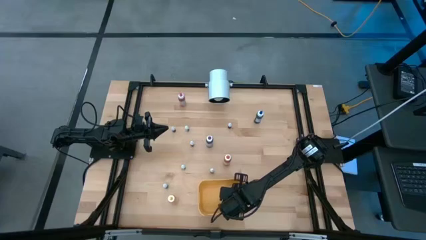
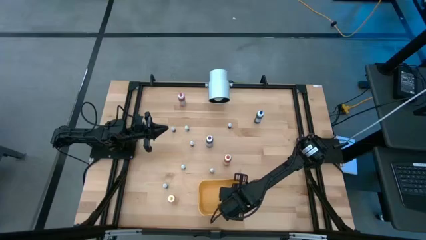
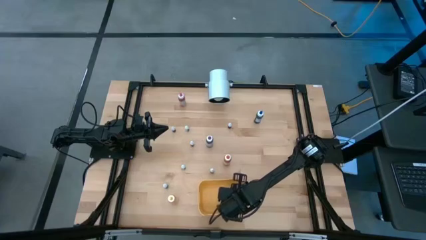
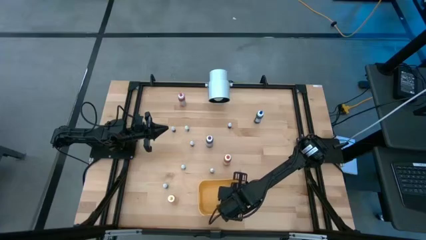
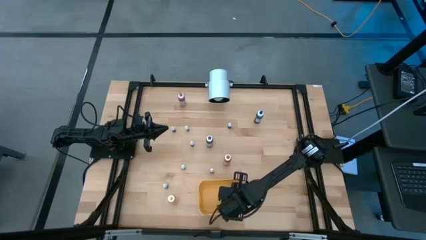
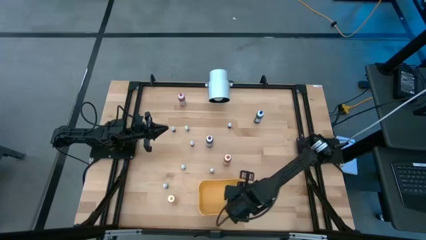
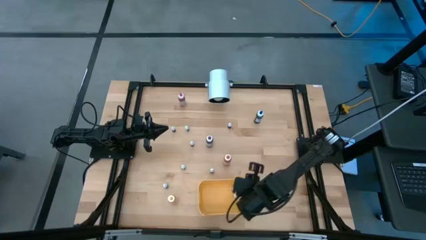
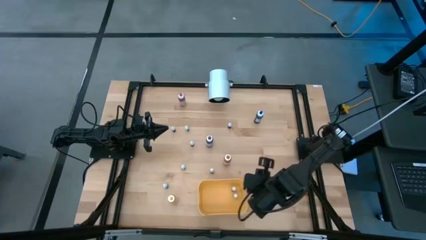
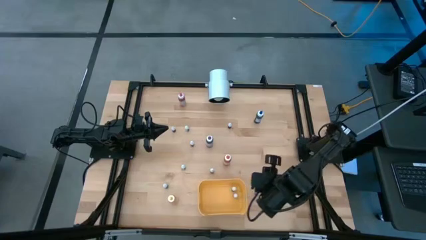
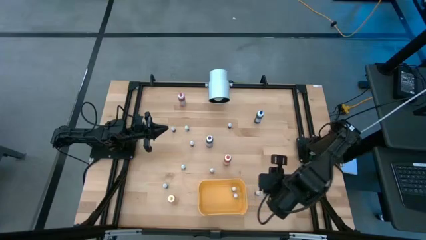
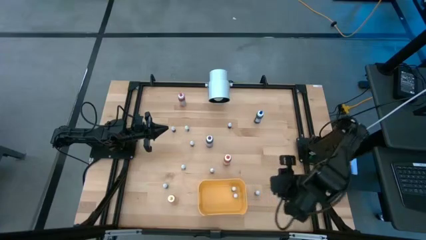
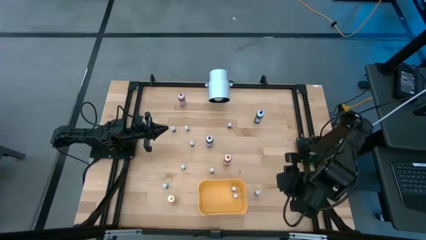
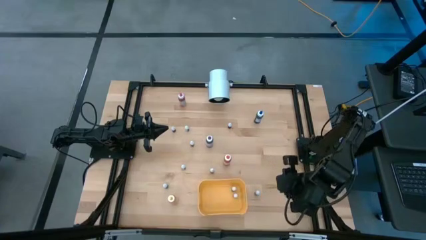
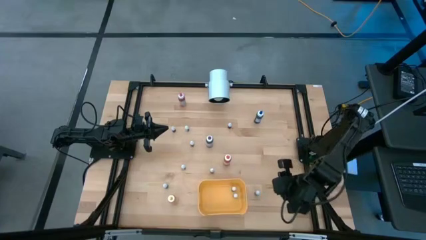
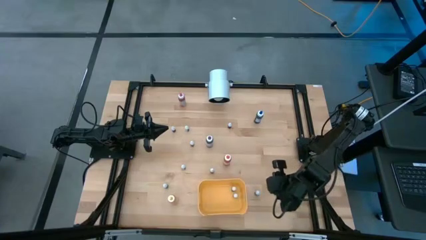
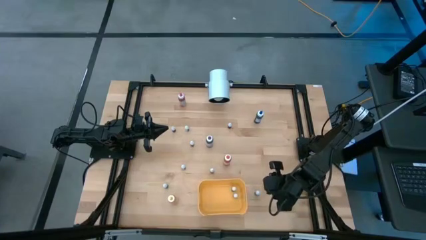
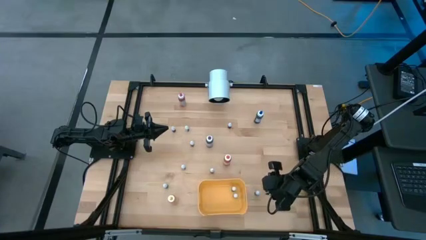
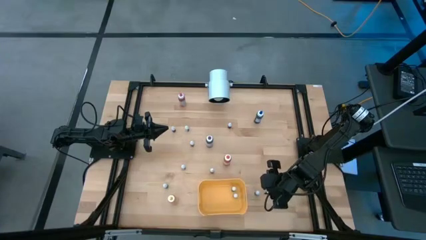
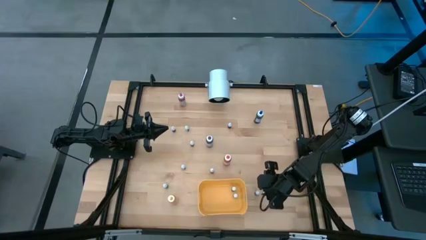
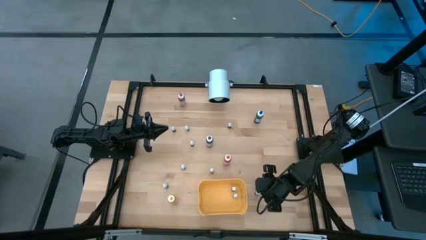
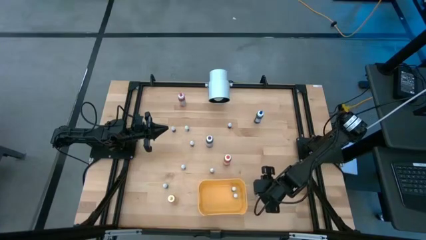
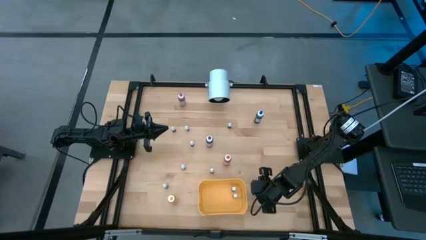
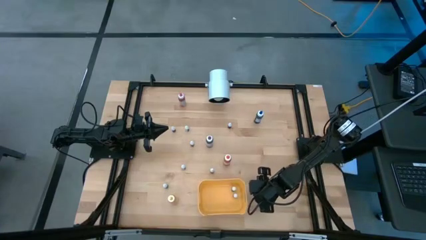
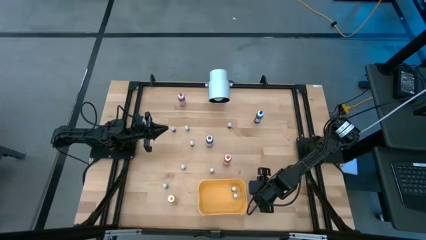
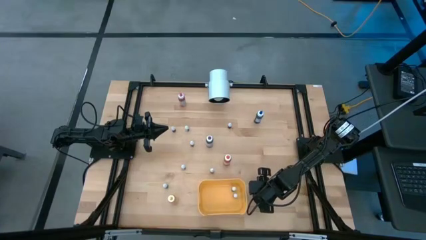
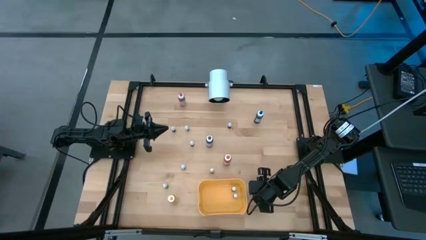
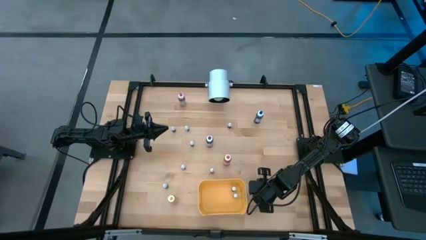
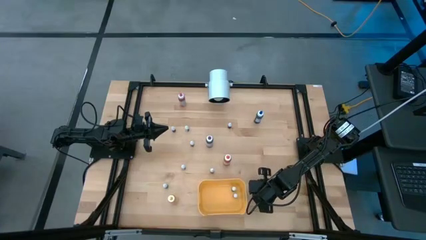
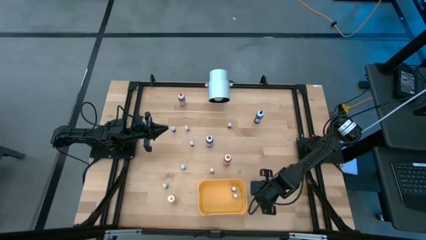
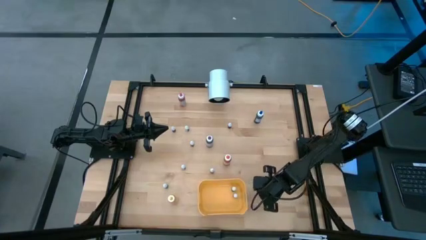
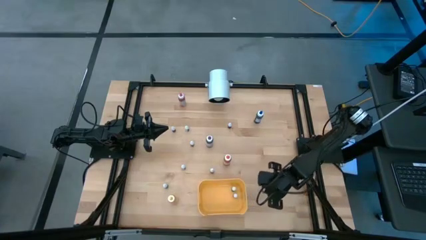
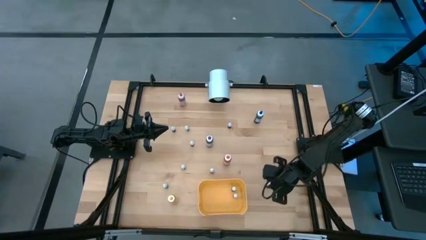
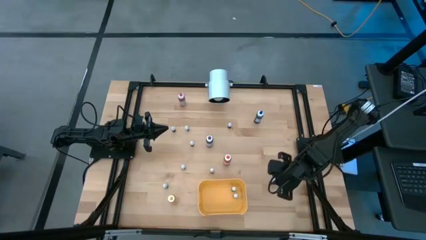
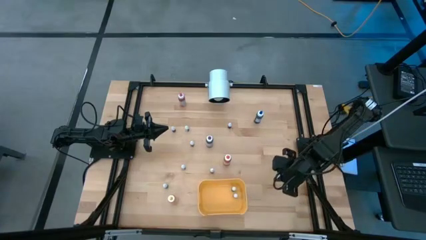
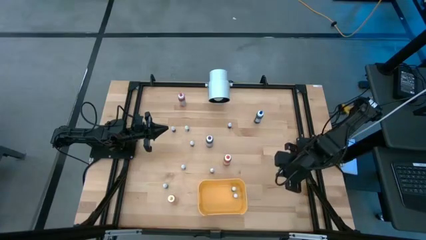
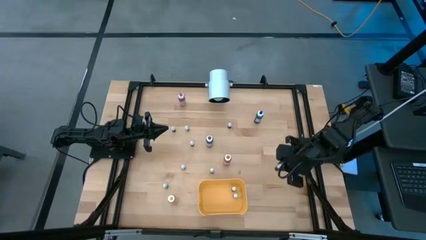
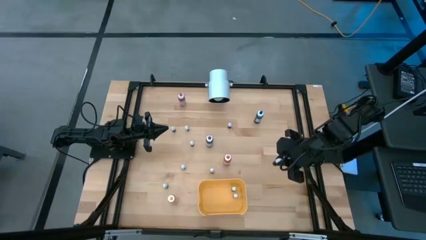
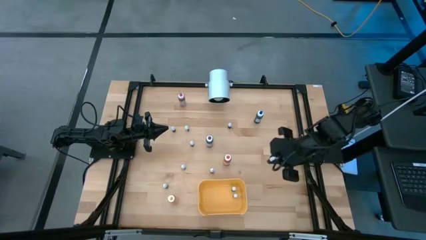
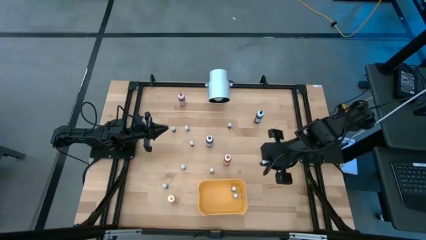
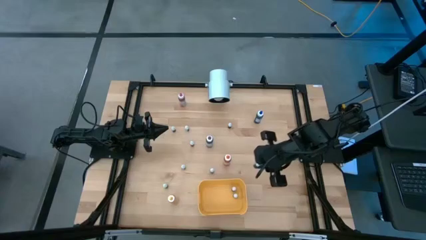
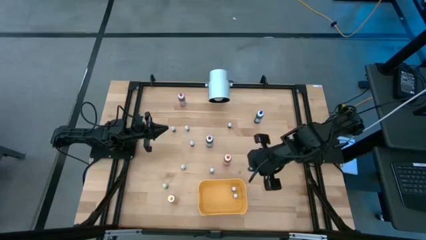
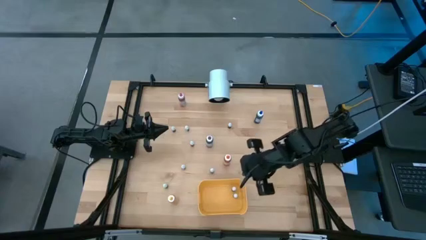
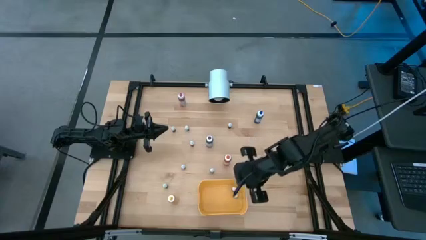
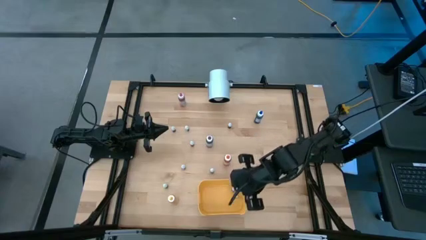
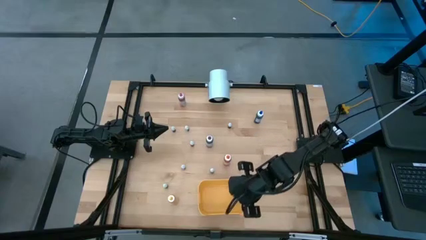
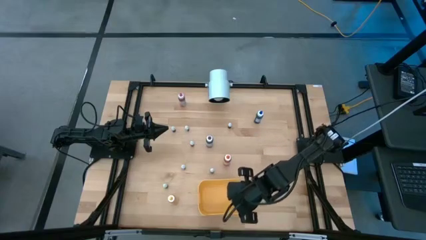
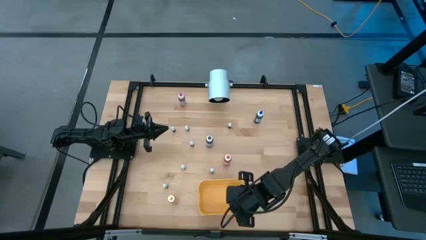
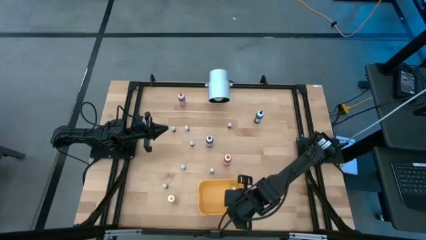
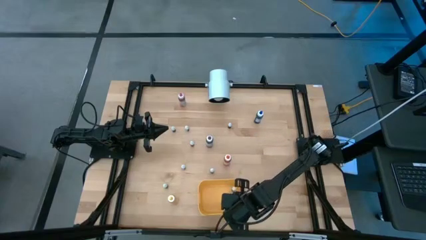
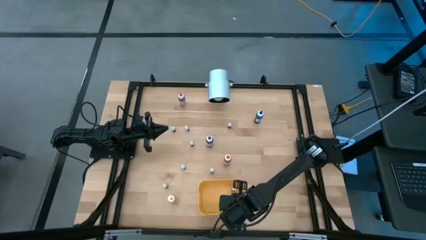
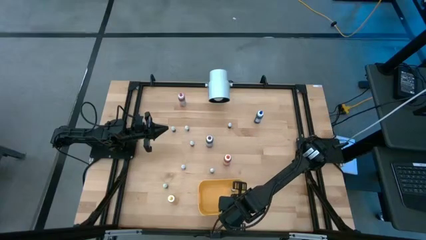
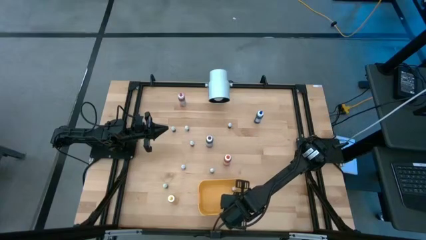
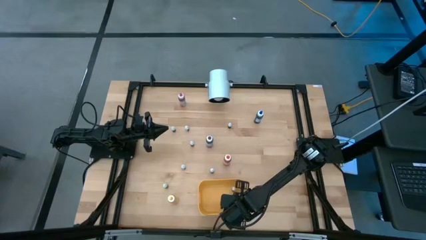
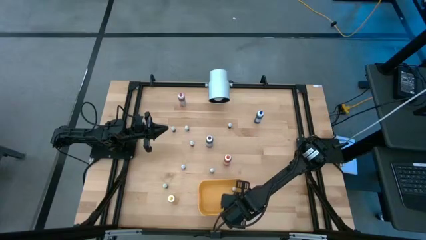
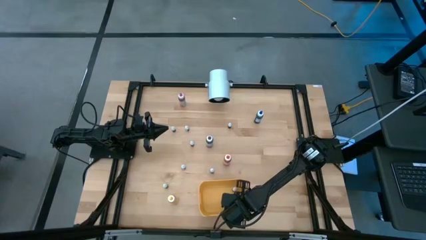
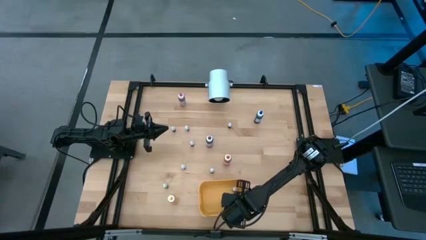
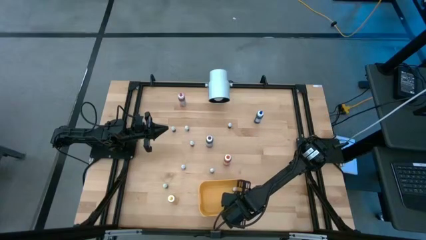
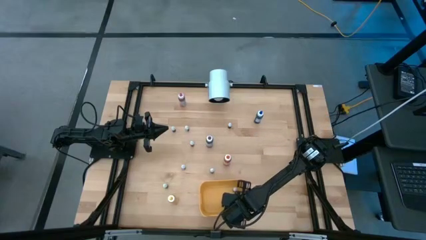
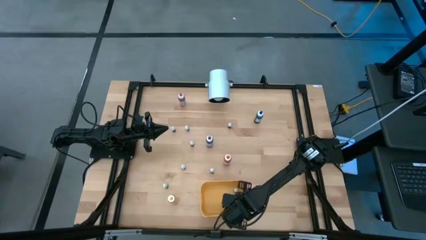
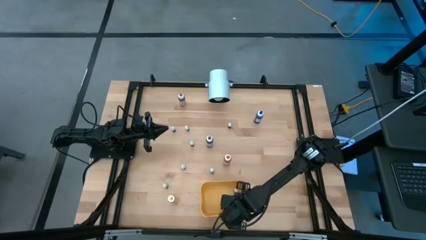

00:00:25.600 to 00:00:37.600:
Task: Pick & Place food coloring
Put the small blue food coloring bottle into the yellow container
